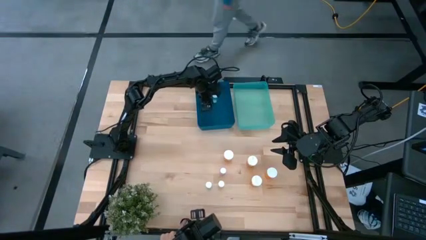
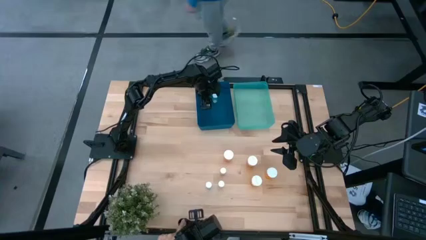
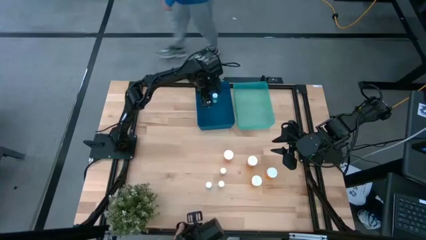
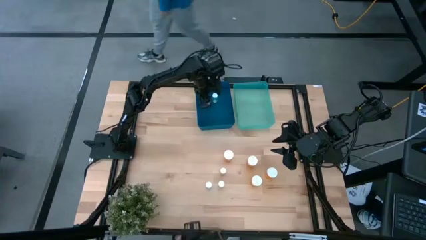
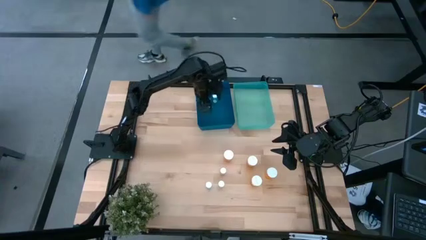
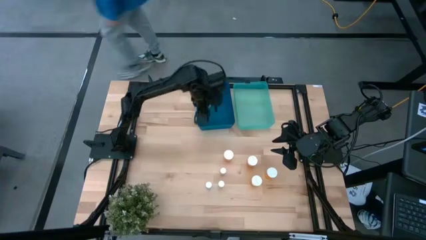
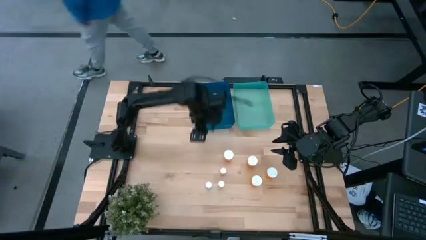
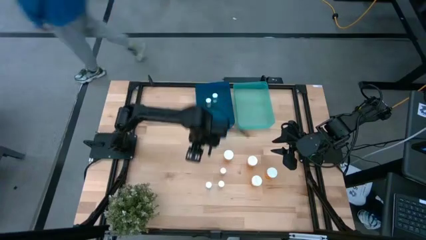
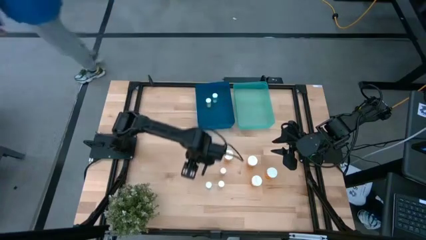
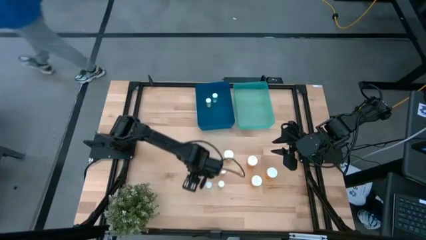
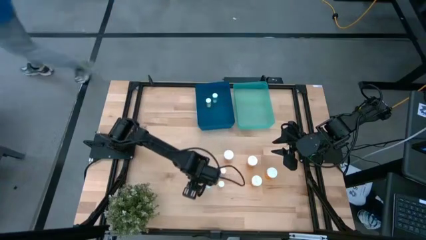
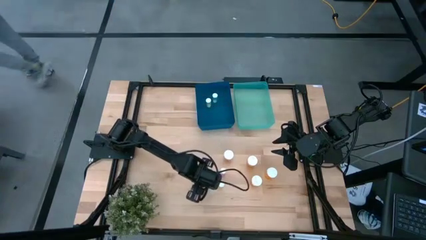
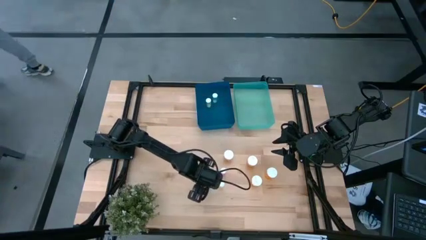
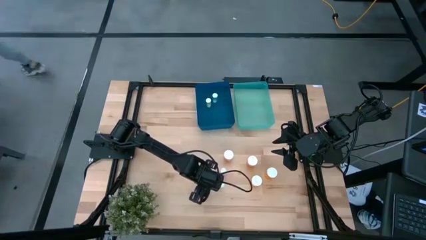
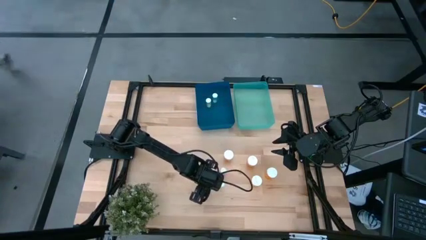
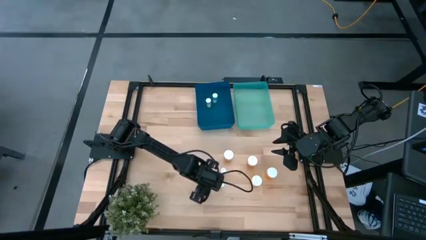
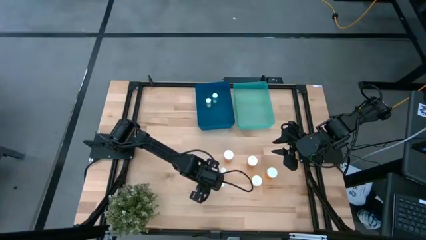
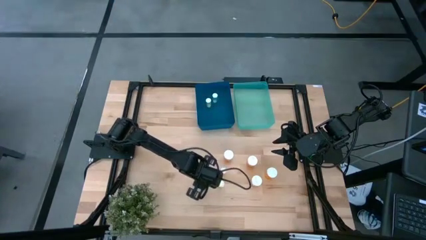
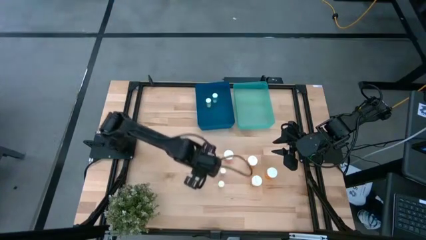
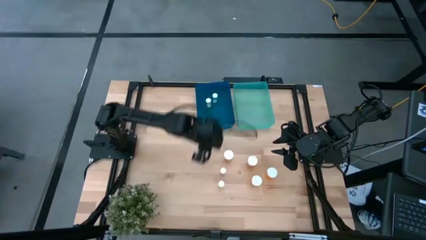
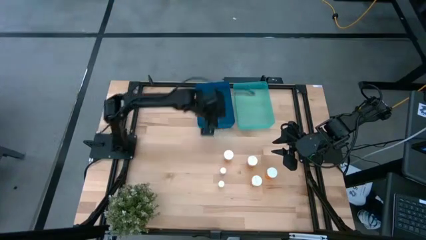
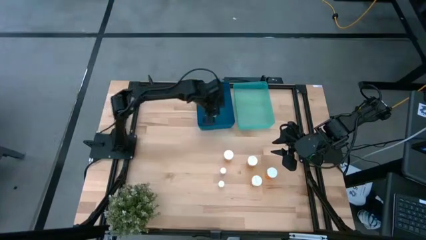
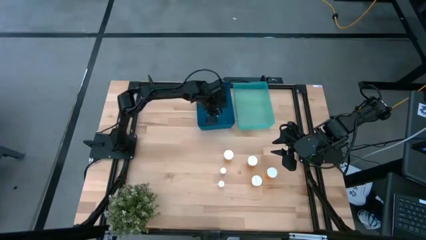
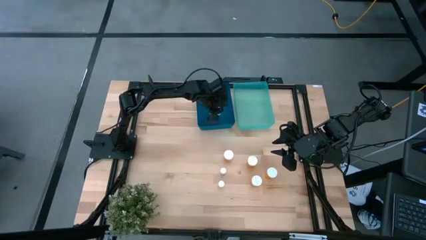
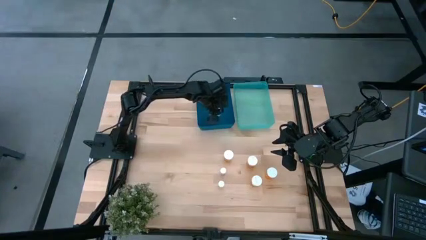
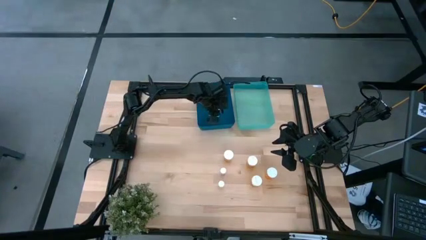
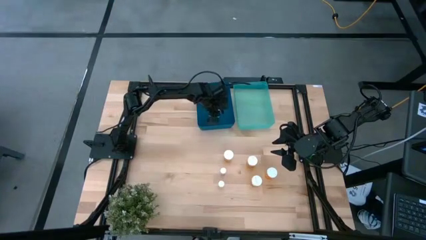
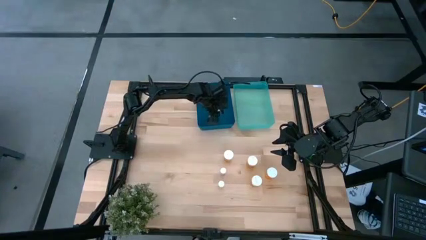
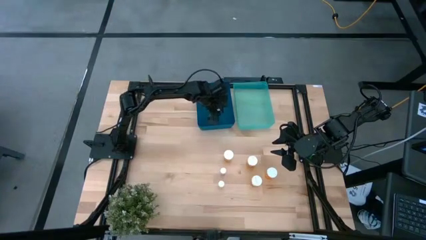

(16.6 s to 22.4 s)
Task: Pick and place medicine bottles into bin by pill shape (circle, oval)
Put the blue pill bottle on the blue bin

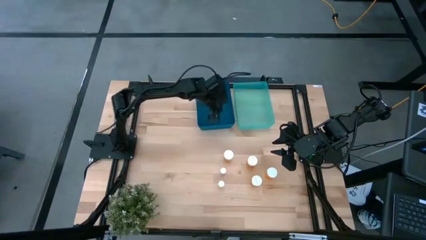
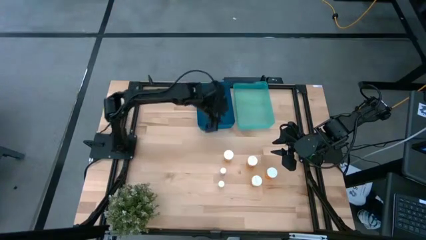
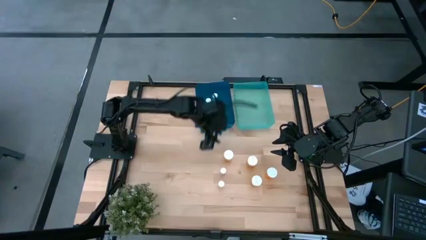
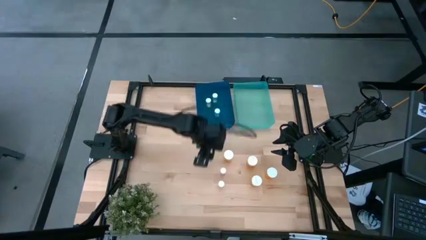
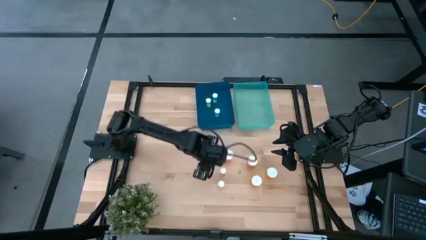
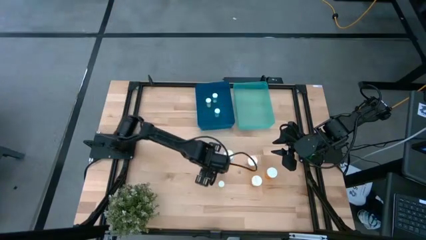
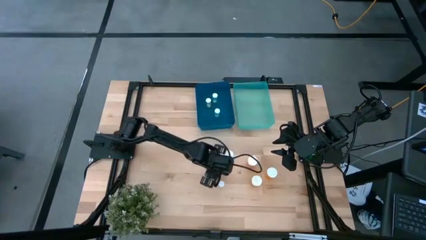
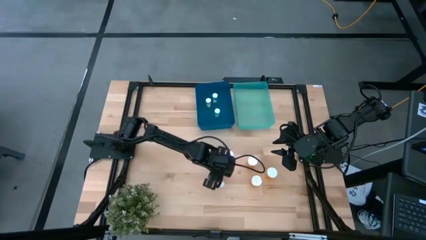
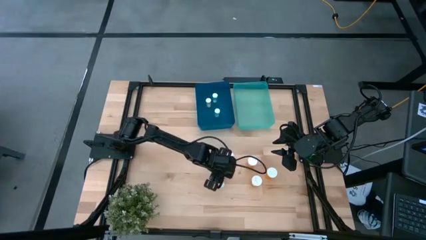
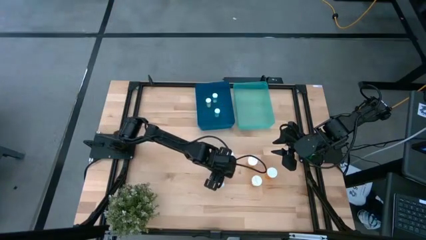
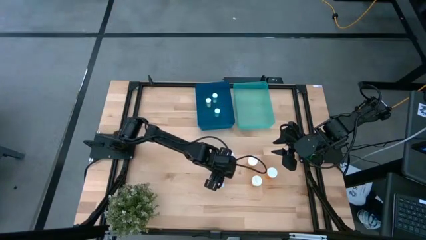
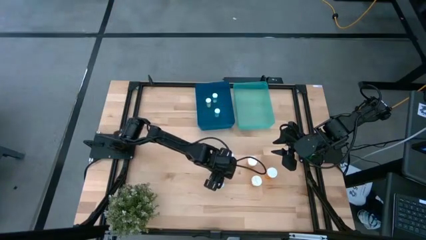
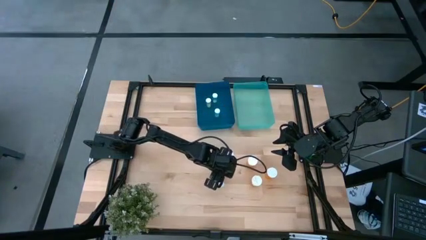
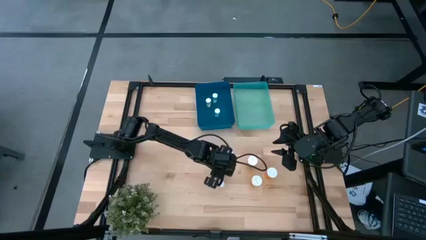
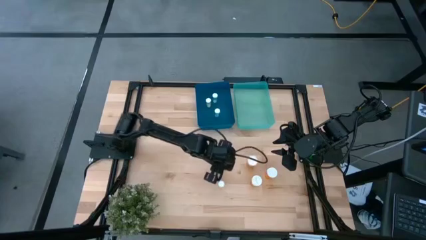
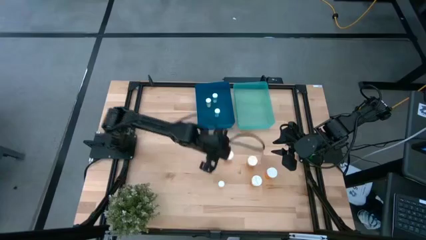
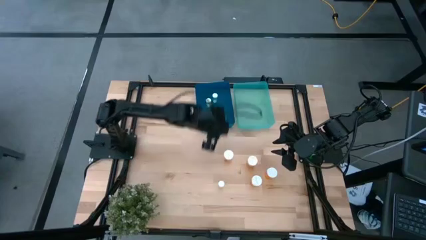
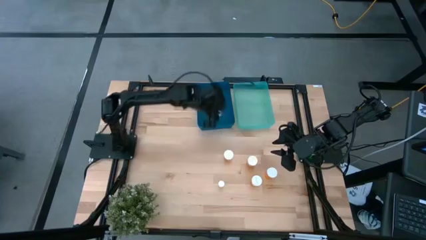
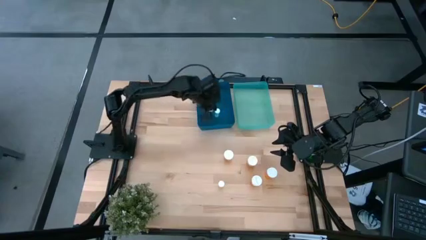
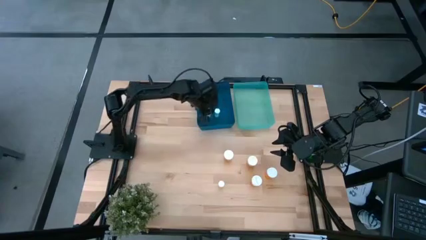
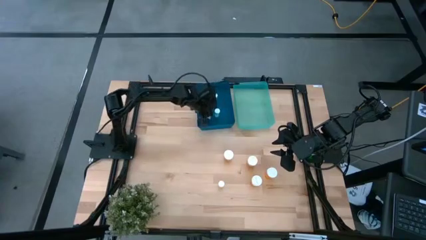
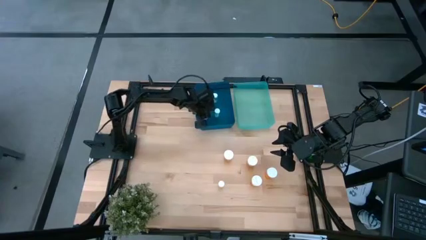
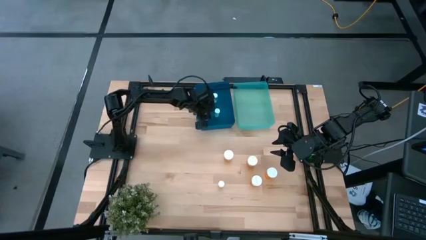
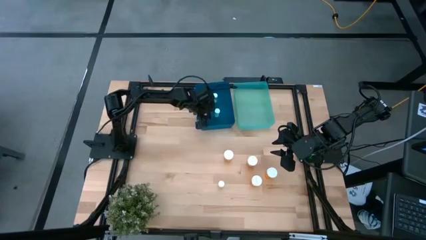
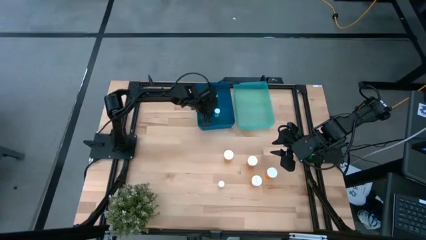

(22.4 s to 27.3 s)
Put the pink pill bottle on the blue bin

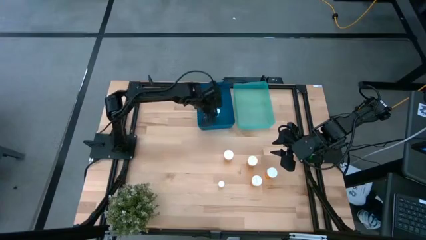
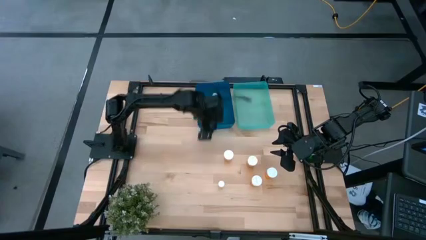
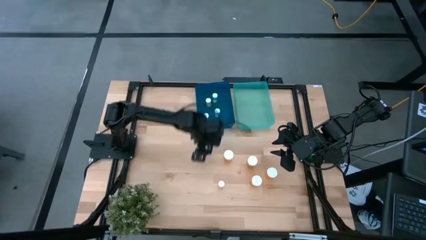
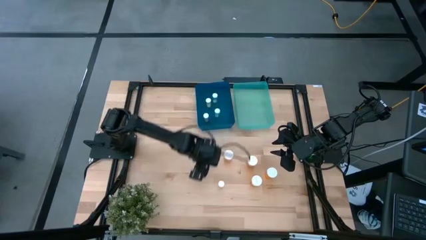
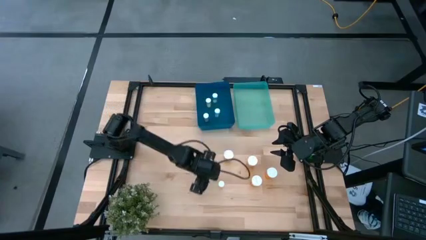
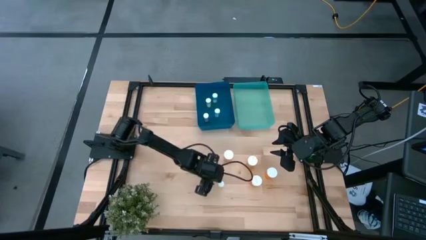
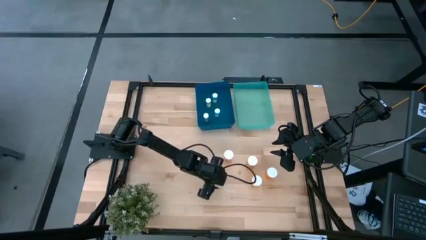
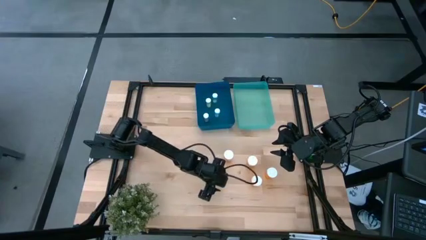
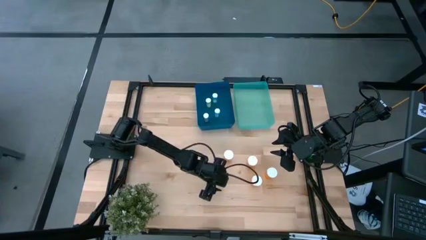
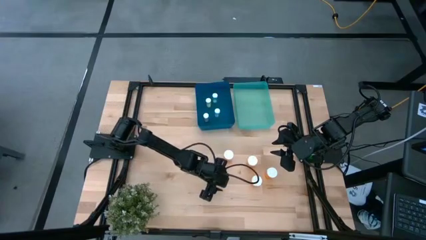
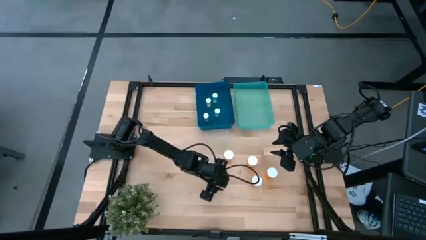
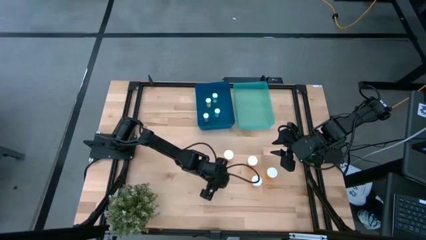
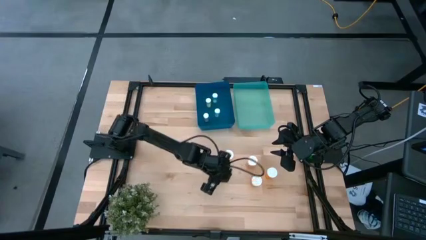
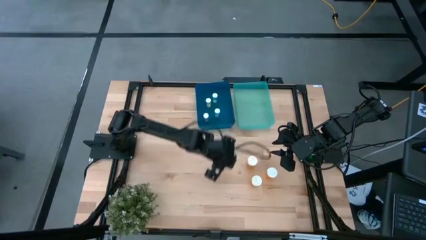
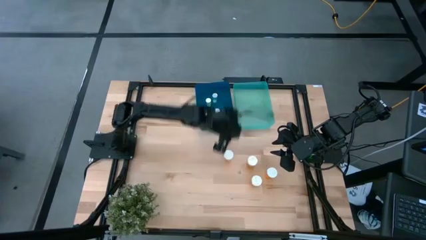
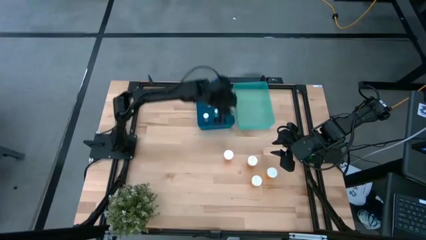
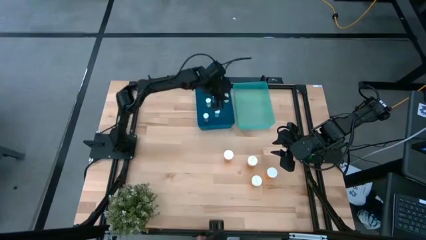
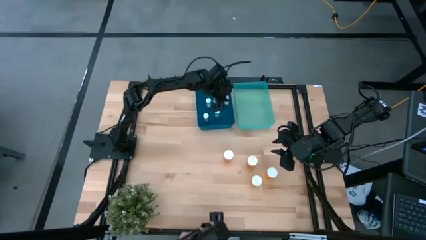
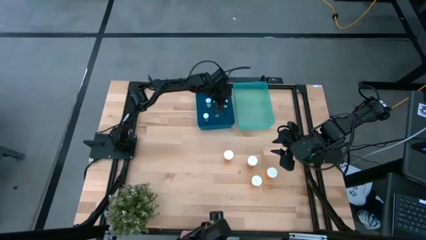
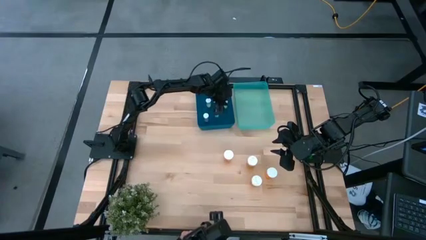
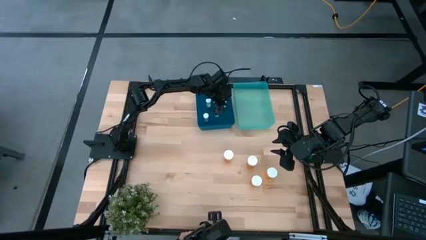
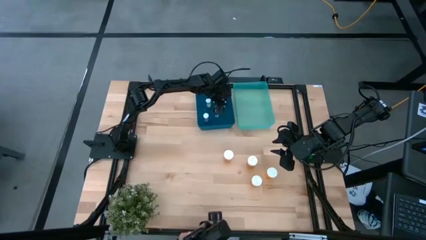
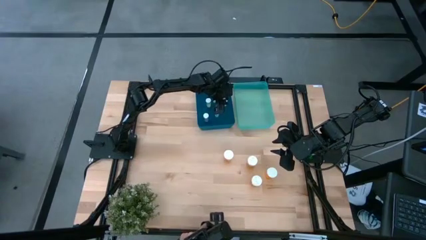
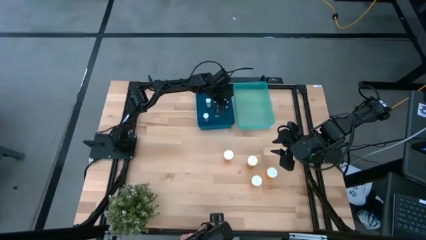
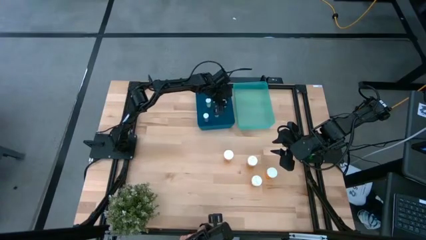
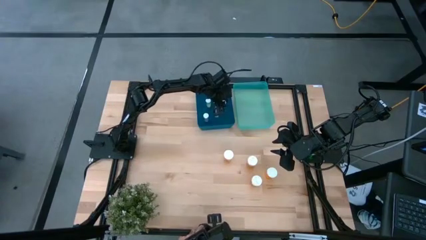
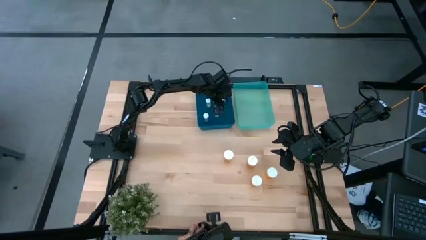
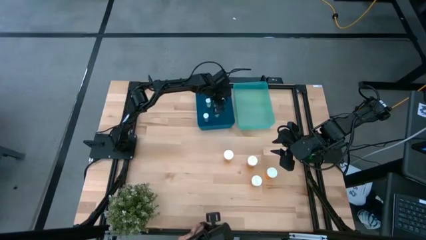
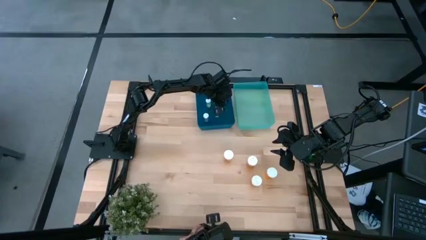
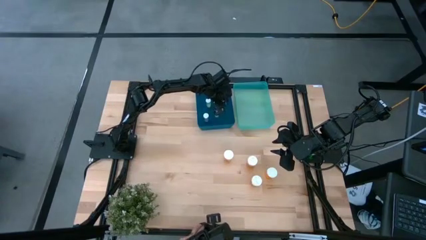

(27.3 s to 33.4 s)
Put the yellow pill bottle on the blue bin

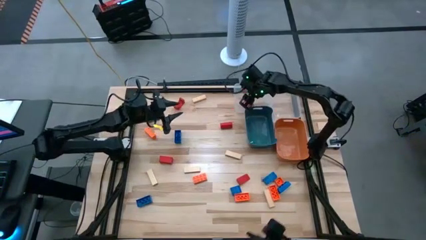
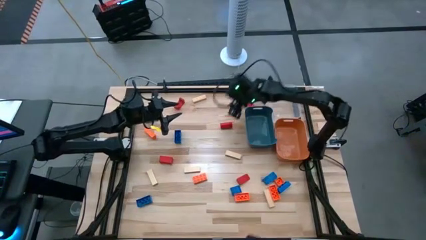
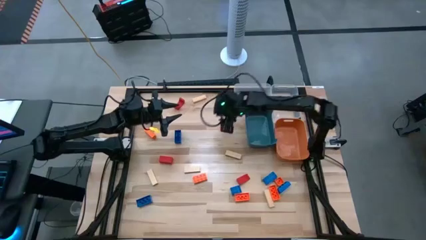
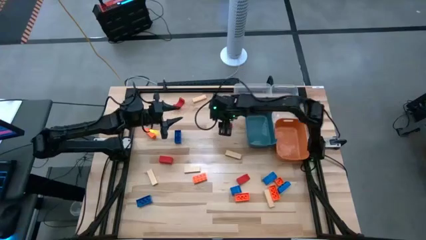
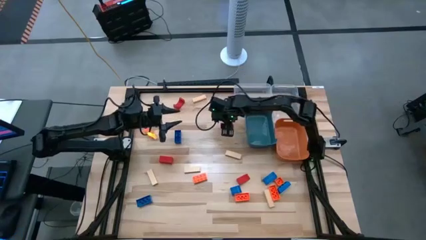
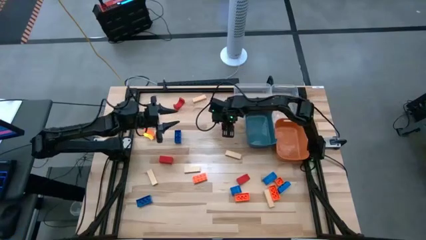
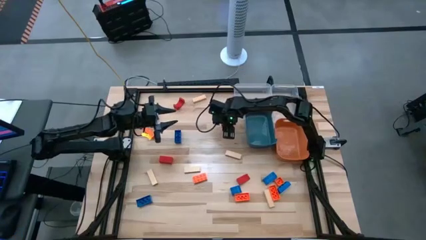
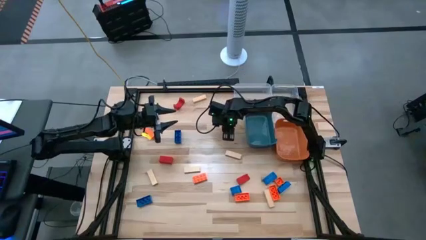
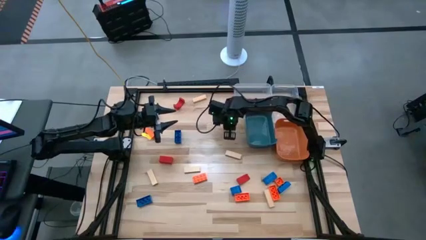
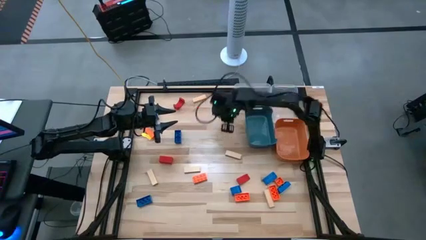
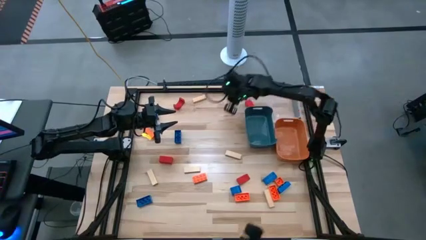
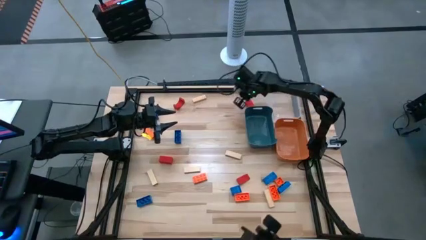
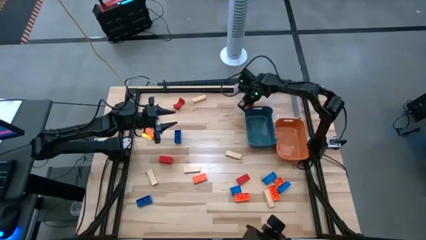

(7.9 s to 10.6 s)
Task: Sort blocks
Put the red block into the left transparent bin
